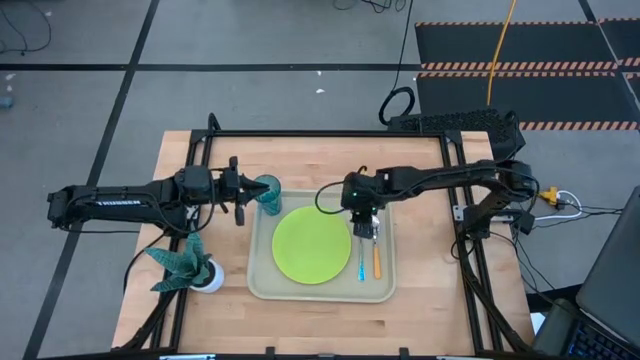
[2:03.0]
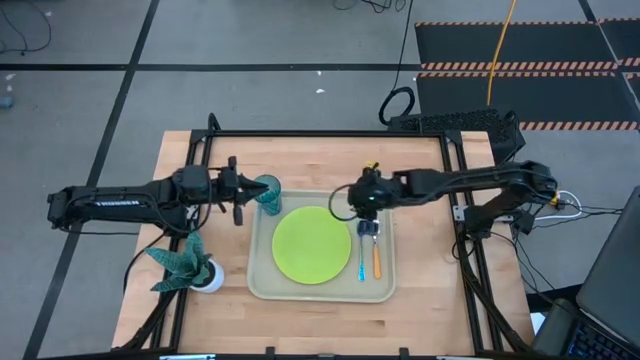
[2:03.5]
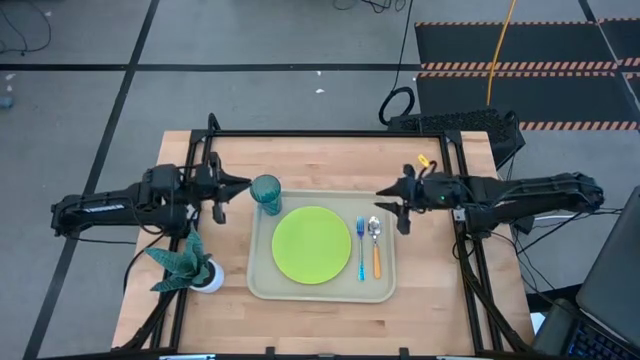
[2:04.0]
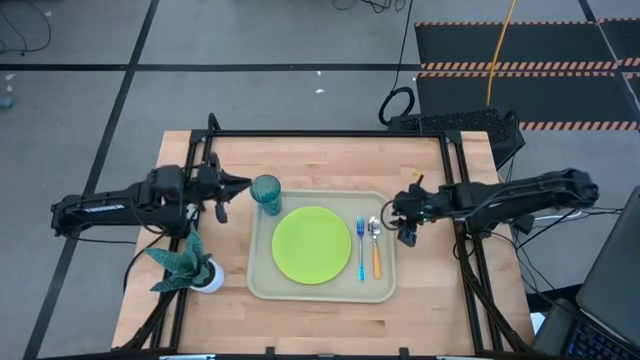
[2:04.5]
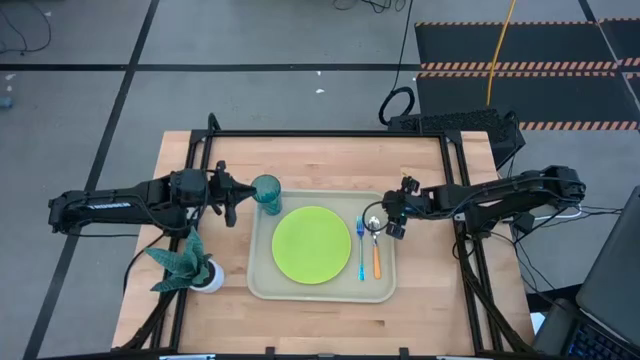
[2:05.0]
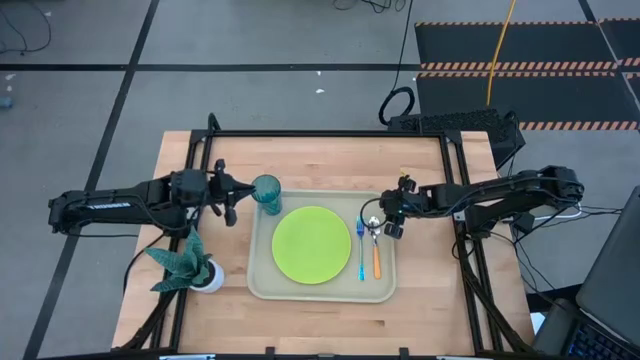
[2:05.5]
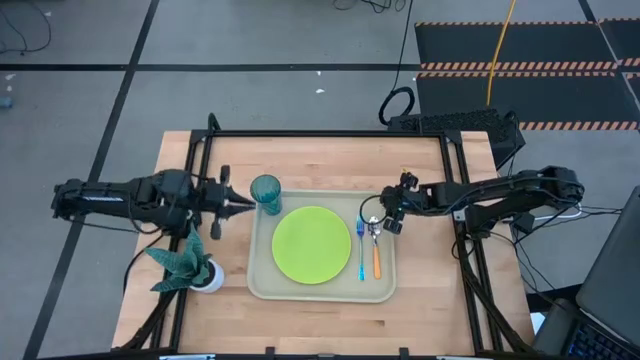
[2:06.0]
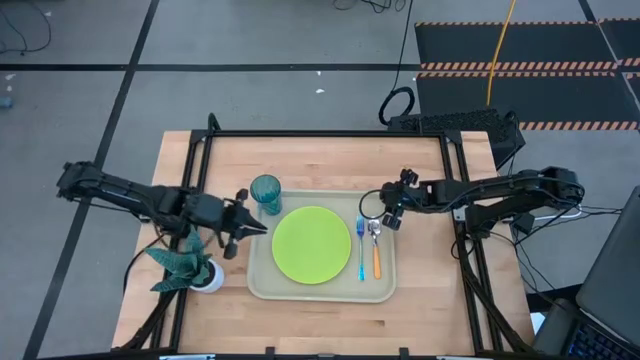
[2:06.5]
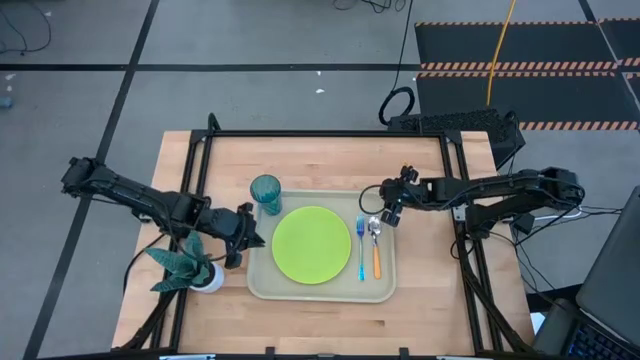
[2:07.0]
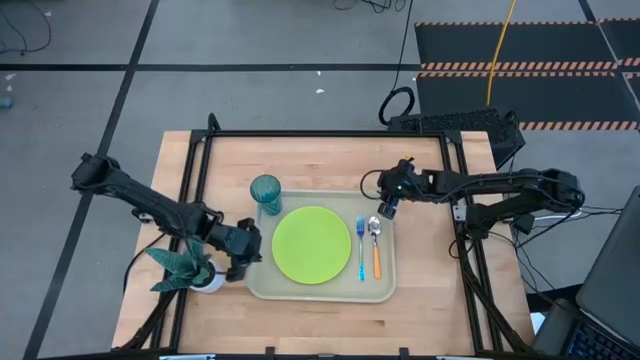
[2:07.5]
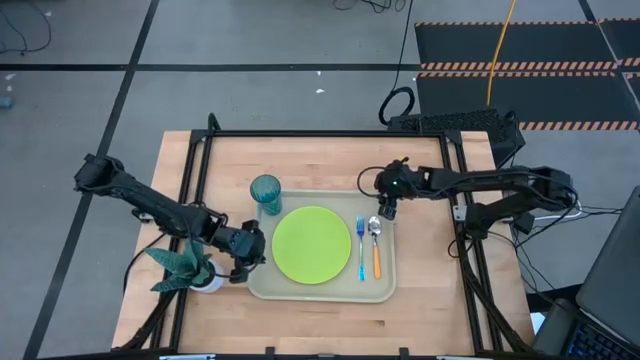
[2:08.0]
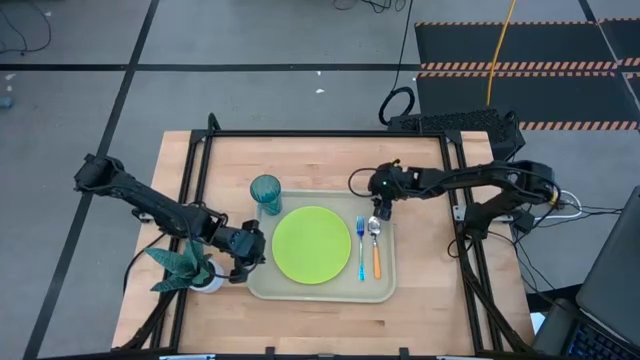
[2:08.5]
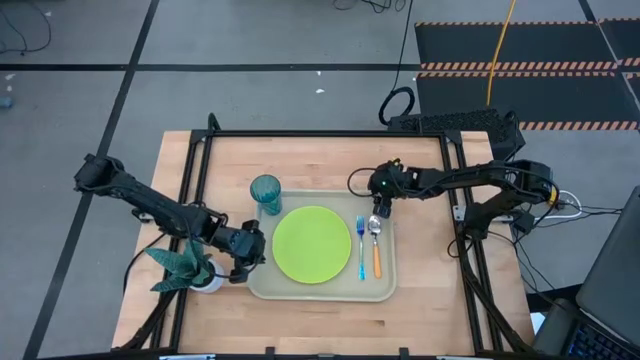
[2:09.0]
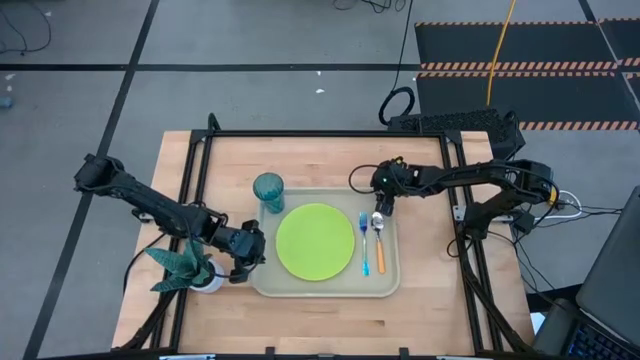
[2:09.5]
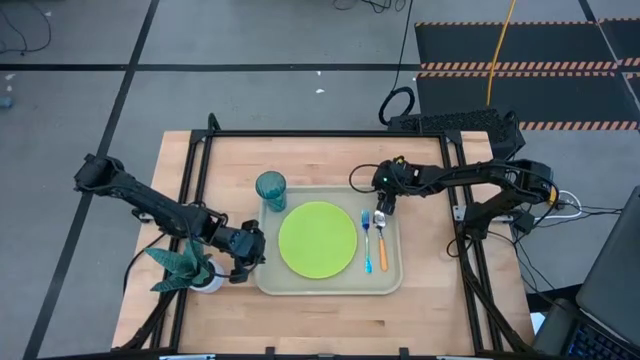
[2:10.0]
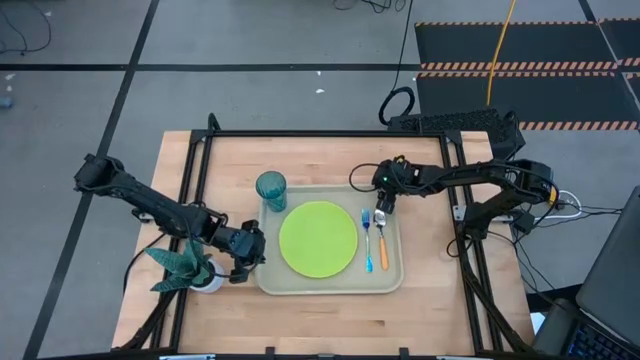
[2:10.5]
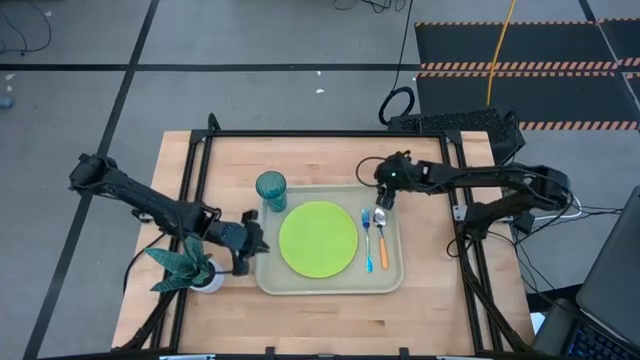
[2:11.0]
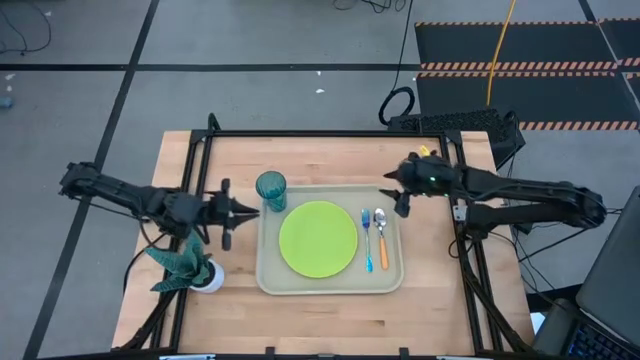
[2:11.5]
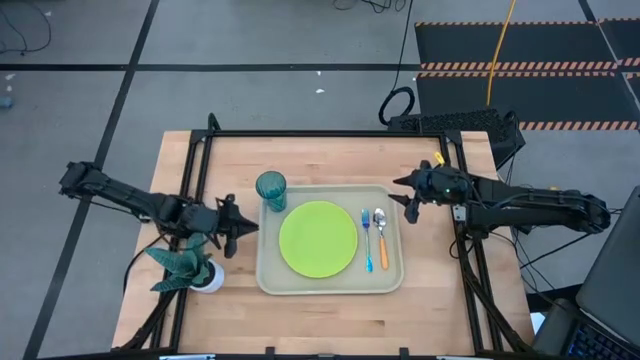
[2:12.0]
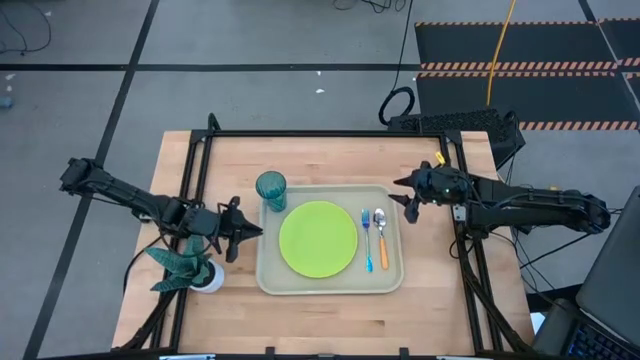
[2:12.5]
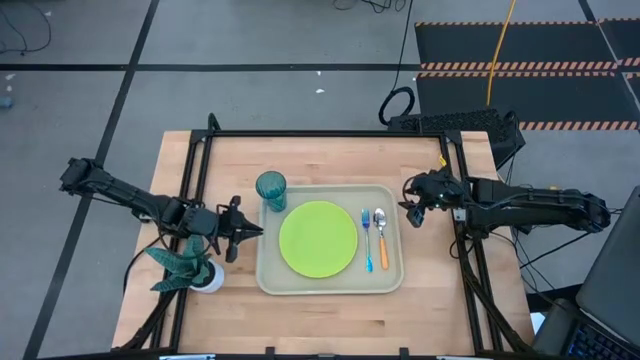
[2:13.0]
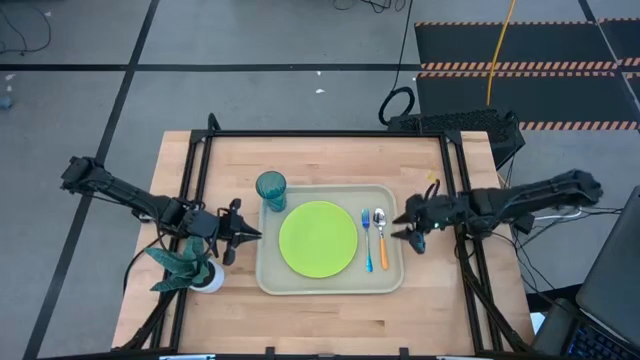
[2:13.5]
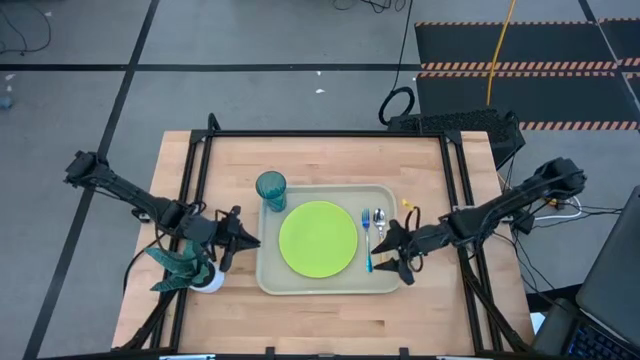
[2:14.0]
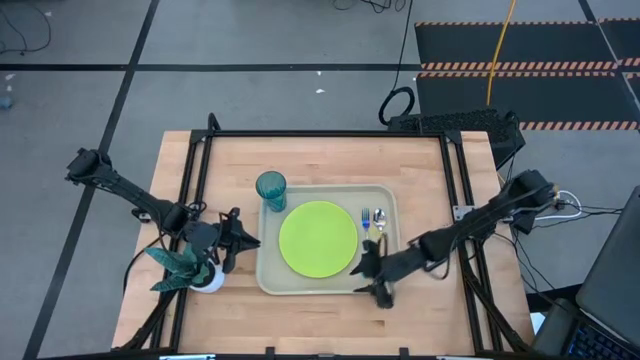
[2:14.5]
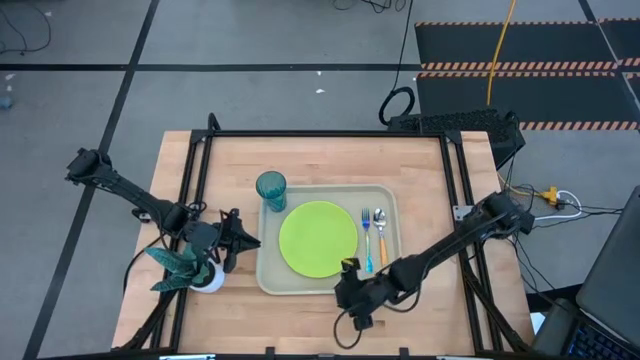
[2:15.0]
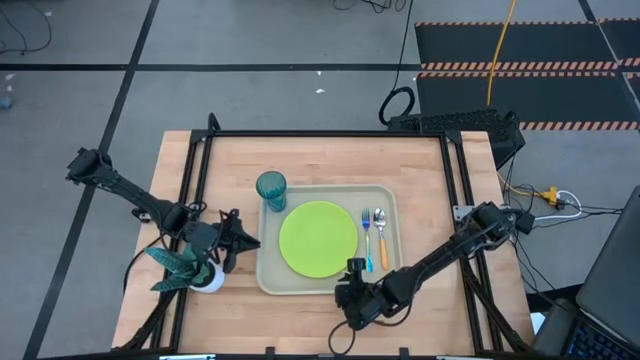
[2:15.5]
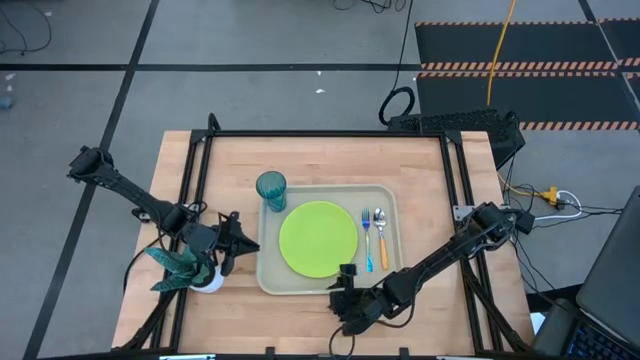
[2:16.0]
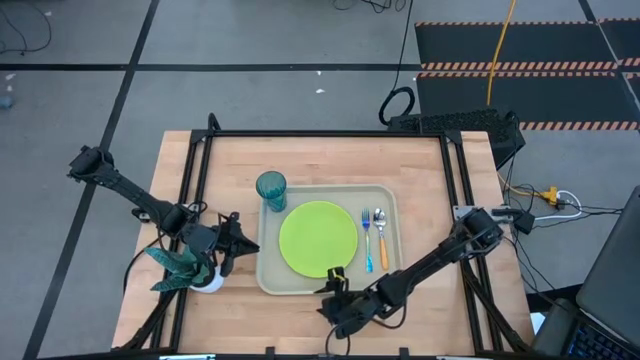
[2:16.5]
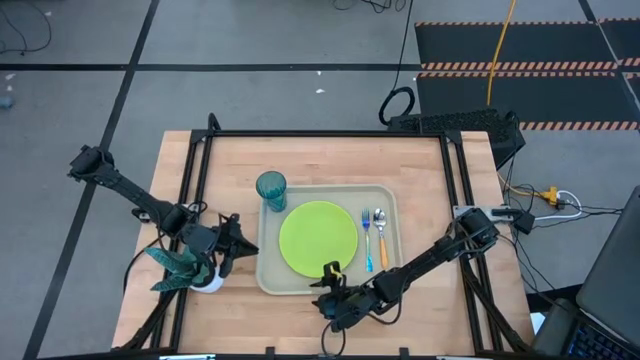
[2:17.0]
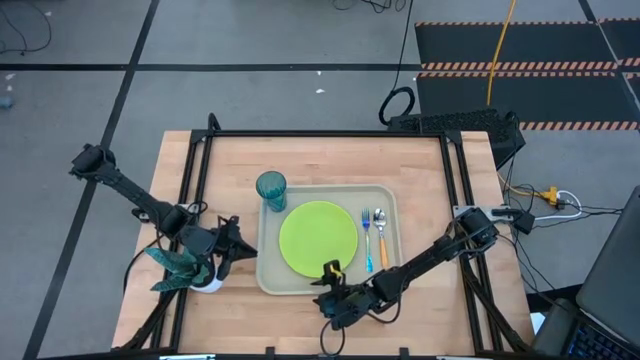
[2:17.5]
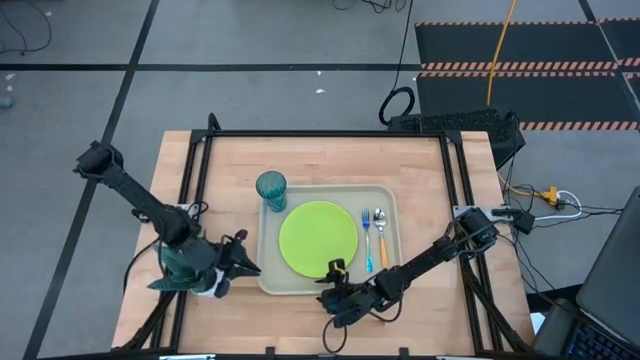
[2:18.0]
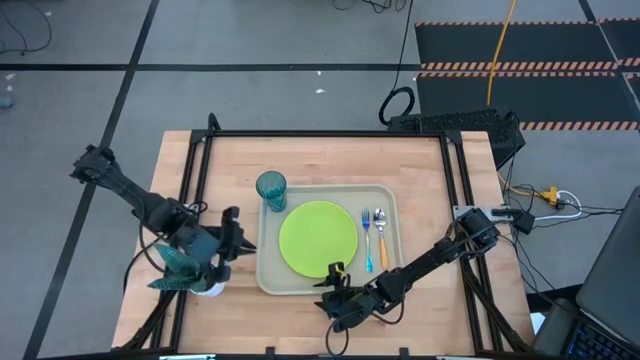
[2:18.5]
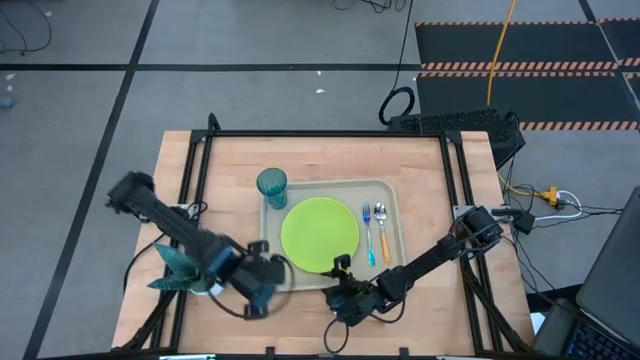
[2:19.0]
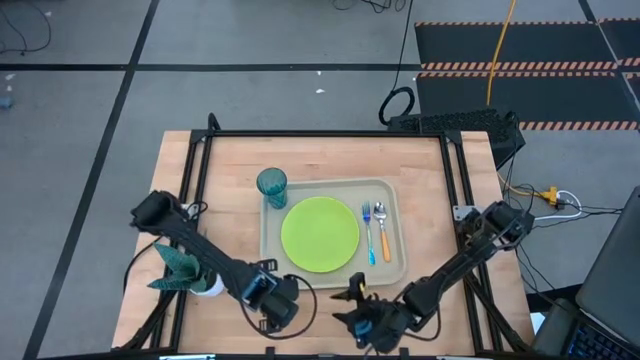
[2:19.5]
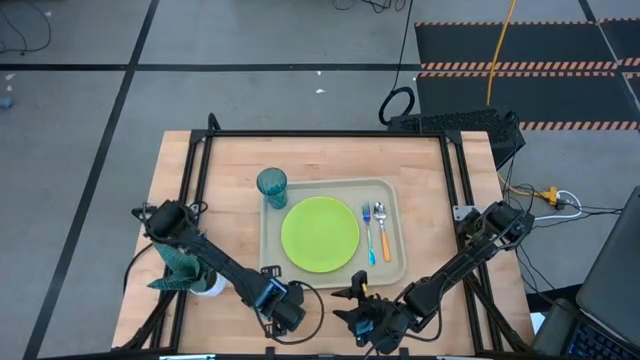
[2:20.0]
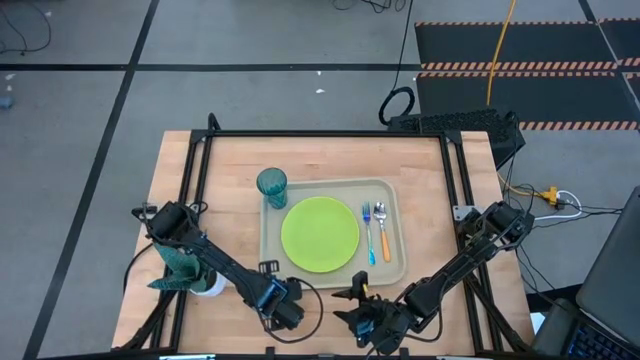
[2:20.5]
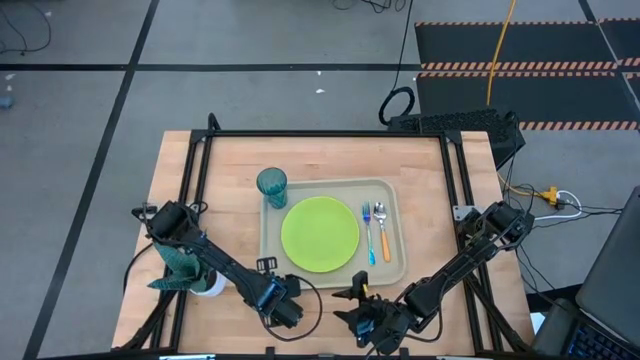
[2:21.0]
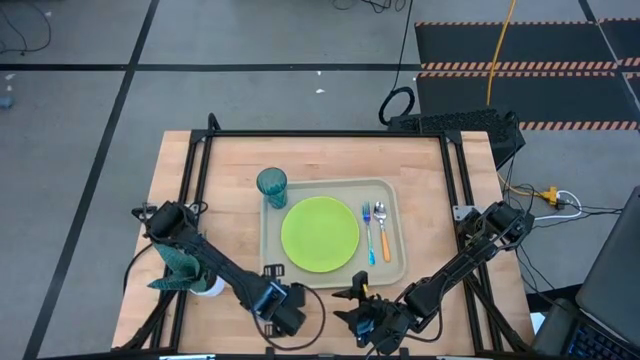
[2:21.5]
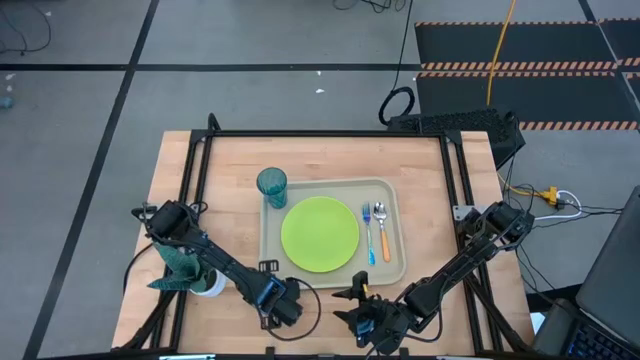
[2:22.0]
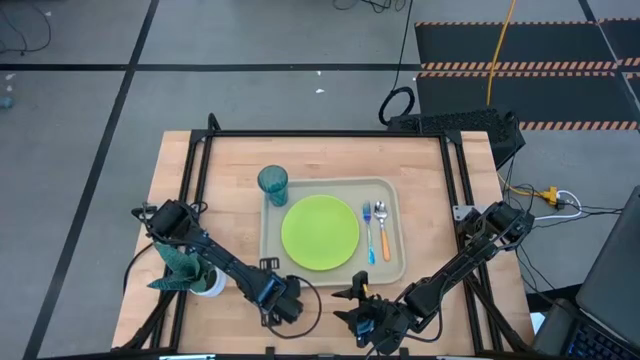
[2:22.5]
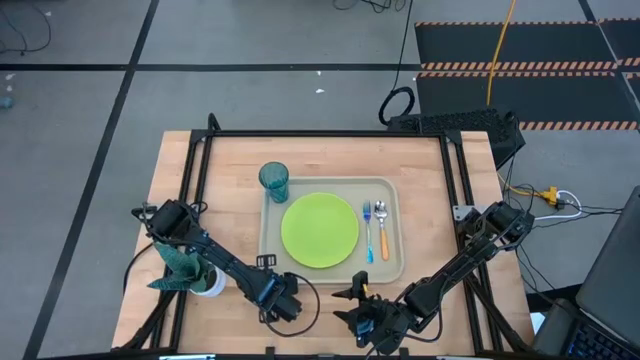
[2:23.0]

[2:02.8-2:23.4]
Task: Pick and place plate/cup/fork/spoon on tray
Adjust the gray serving tray

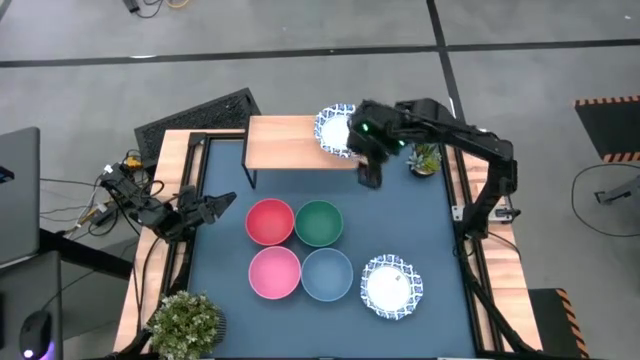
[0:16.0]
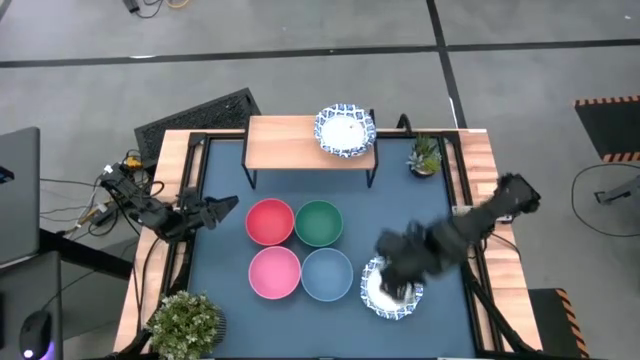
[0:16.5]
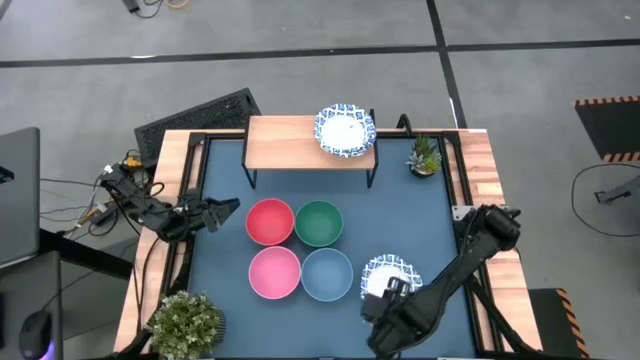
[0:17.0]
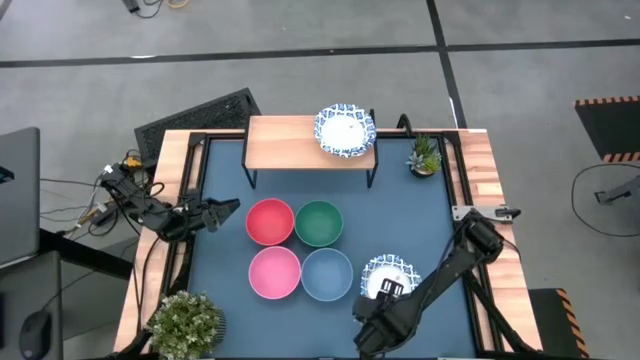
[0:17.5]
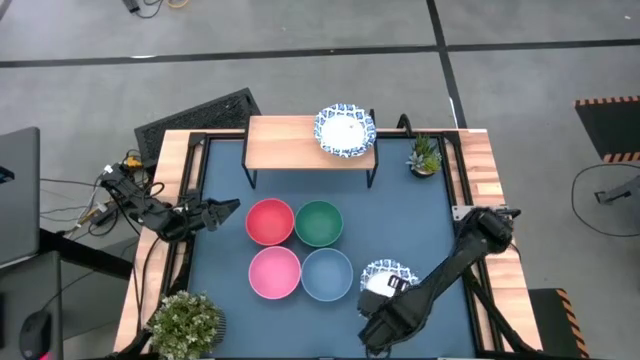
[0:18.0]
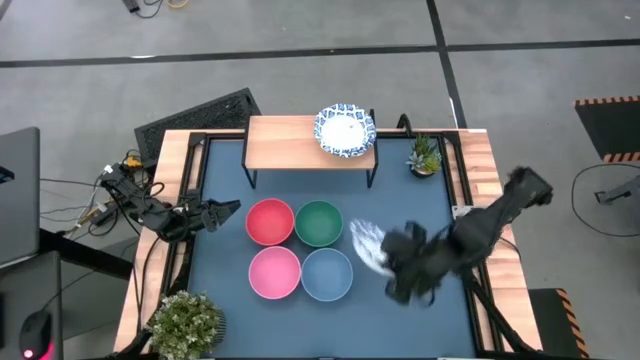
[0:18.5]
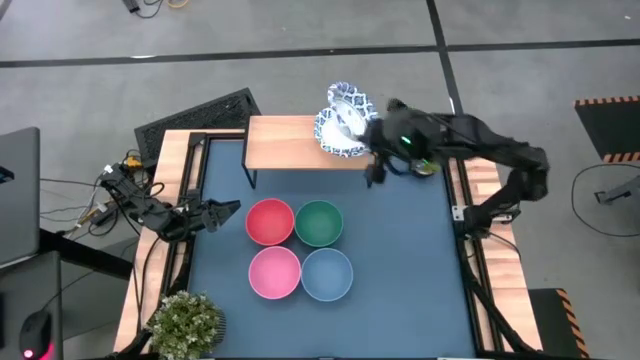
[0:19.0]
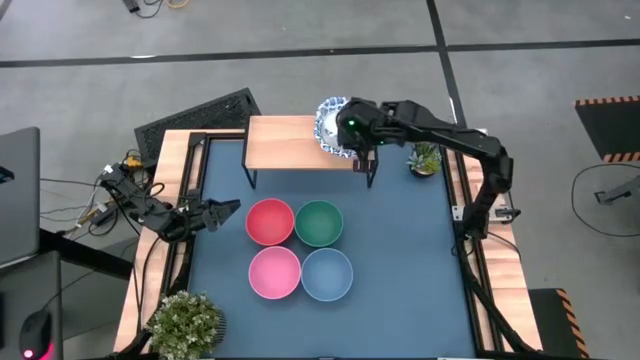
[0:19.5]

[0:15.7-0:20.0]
Task: Place and stack bowls onto a shelf
Stack the white patterned bowl on top of the white patterned bowl on the shelf
